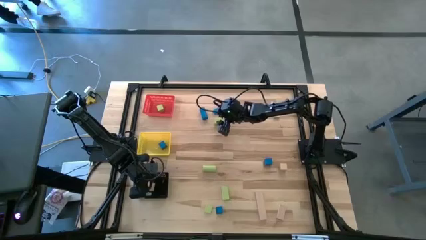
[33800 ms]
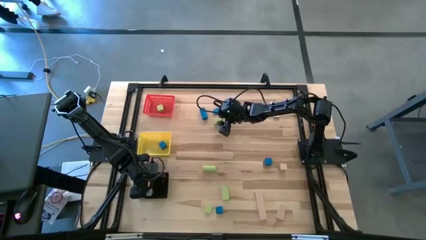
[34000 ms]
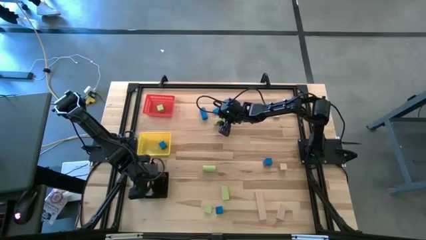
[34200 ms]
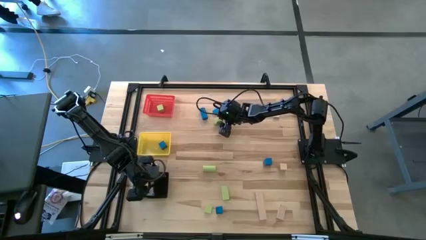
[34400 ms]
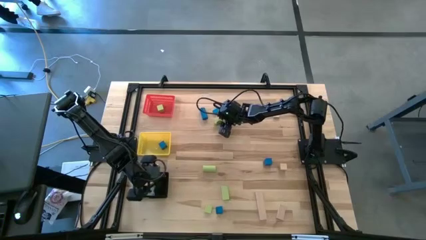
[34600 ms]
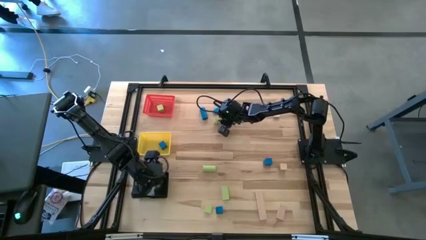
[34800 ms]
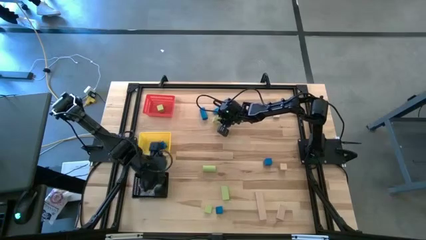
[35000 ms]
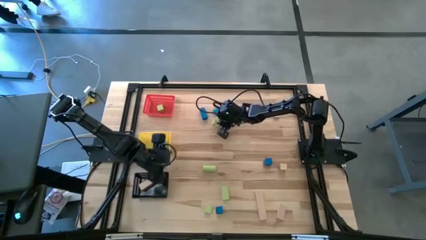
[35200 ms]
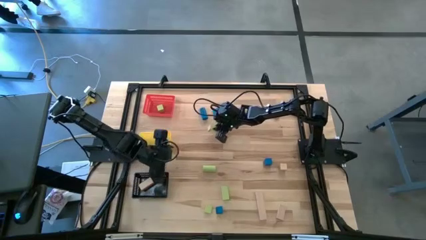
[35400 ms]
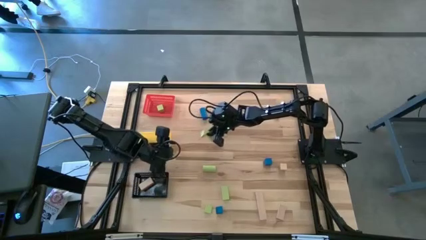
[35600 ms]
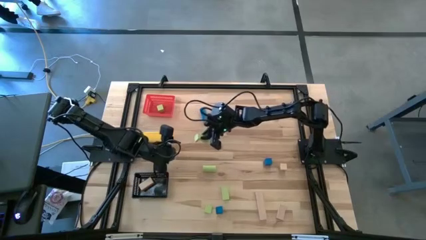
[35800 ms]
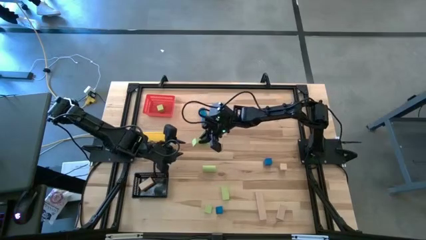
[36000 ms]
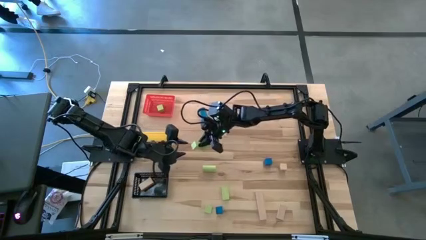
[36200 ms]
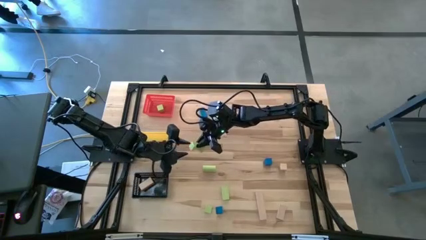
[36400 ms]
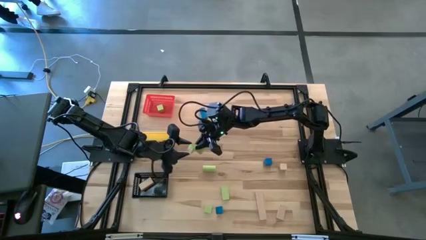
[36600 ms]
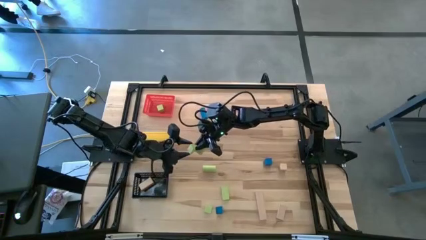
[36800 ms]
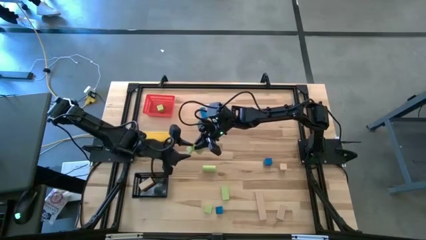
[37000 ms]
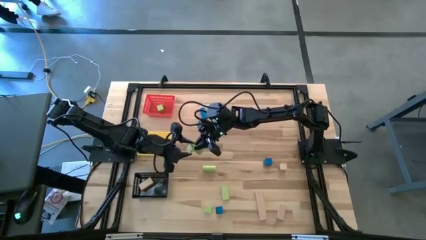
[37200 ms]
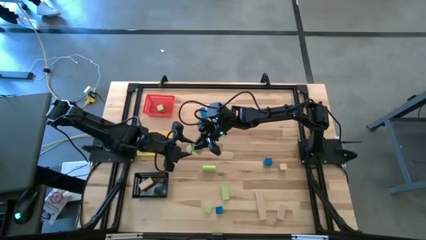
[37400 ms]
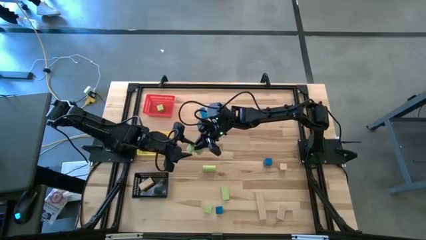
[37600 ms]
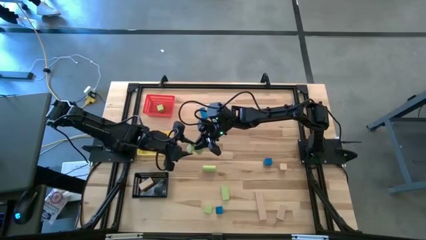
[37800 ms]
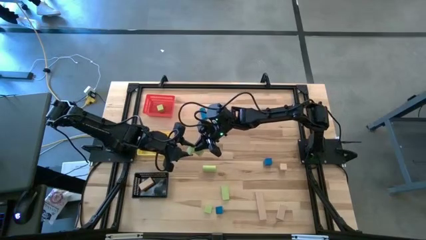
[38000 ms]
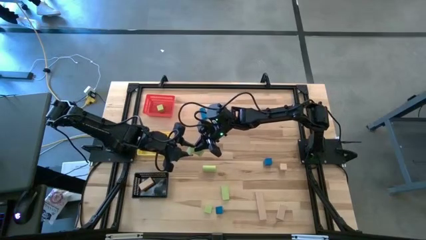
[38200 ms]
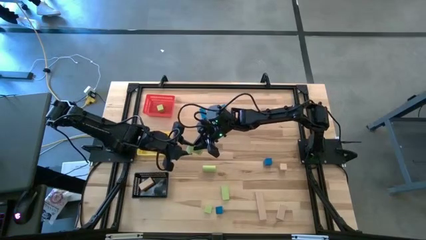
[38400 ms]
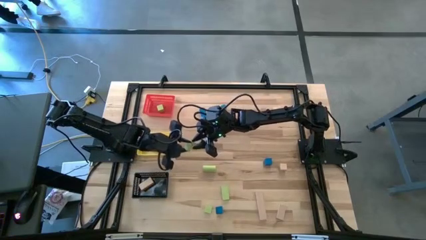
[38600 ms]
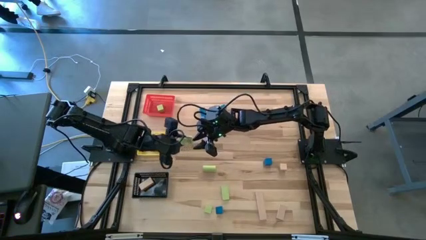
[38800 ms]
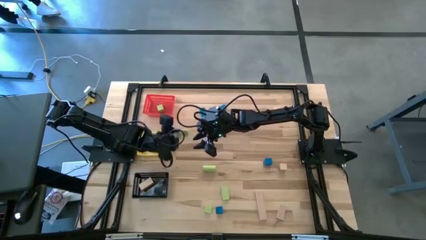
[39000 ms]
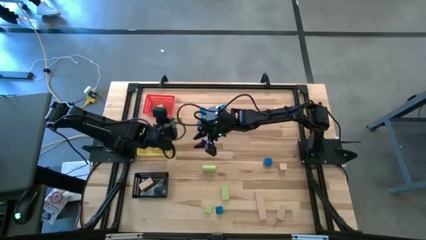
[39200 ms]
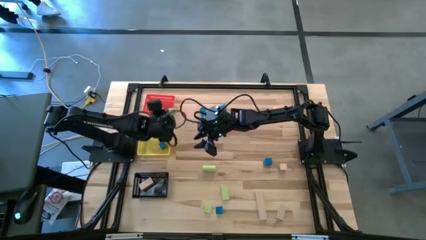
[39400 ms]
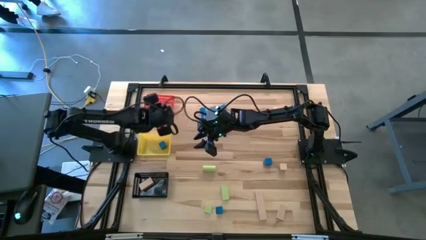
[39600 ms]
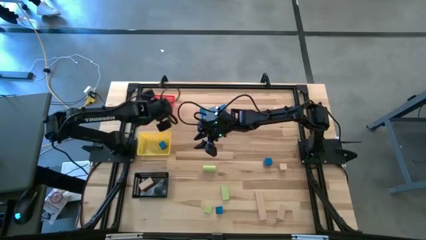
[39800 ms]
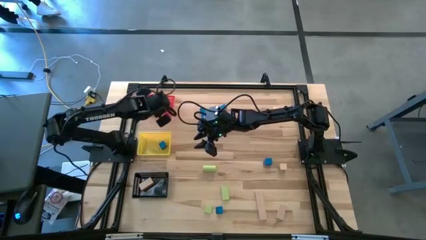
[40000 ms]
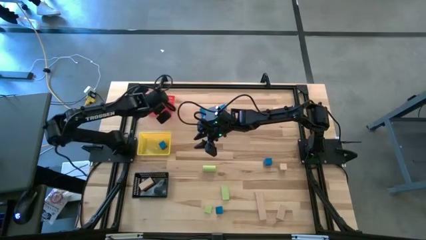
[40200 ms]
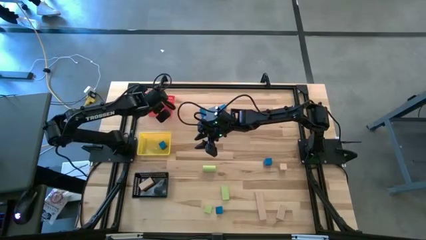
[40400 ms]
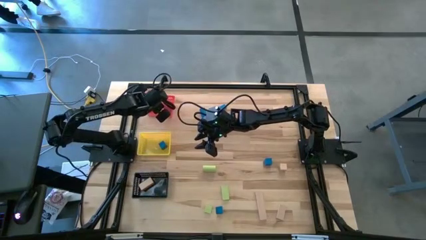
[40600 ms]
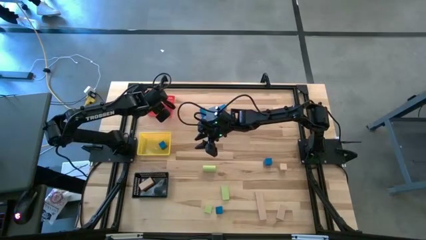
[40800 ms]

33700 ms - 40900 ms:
Task: Sort & place blocks by color
Put the green block into the red basket

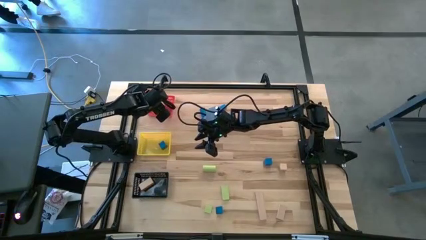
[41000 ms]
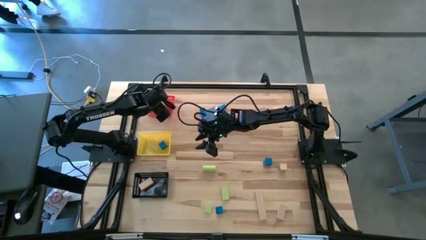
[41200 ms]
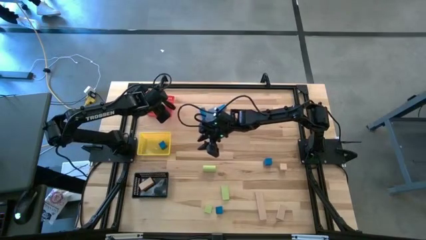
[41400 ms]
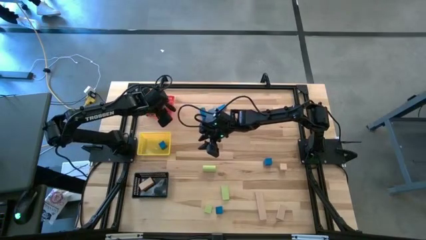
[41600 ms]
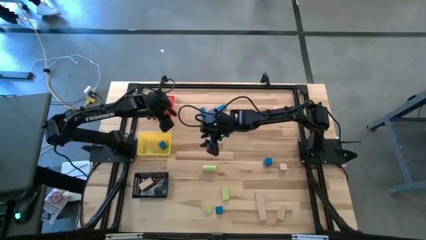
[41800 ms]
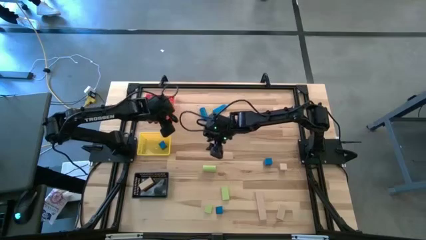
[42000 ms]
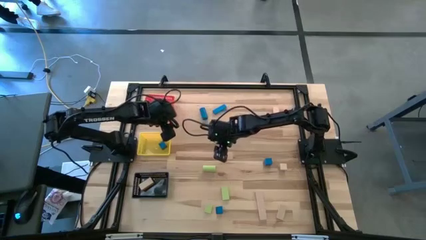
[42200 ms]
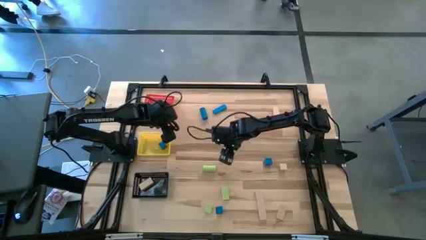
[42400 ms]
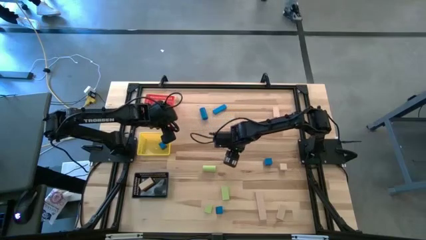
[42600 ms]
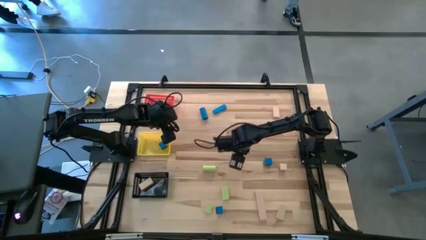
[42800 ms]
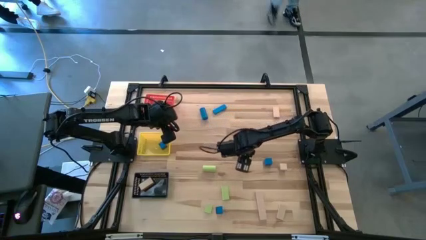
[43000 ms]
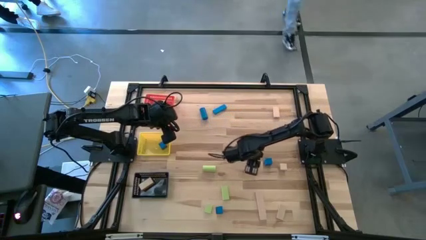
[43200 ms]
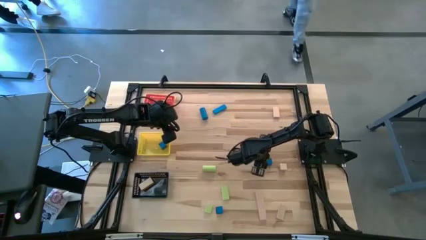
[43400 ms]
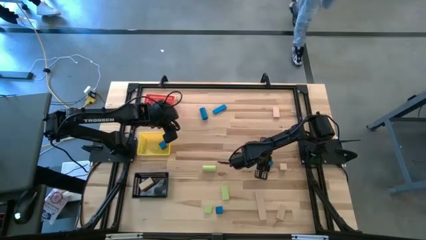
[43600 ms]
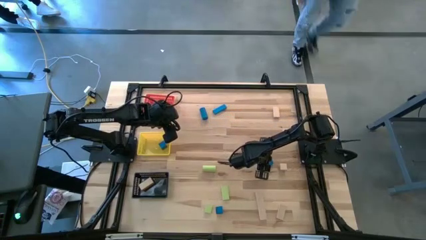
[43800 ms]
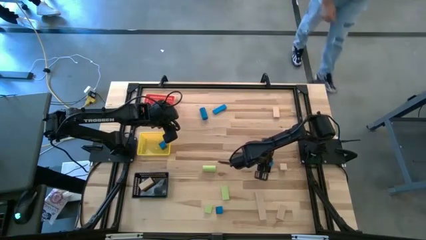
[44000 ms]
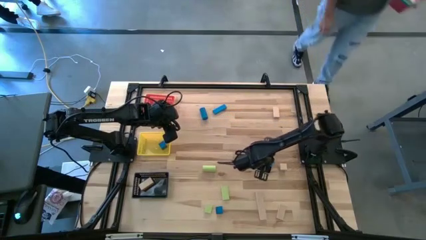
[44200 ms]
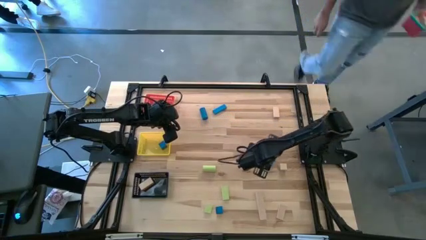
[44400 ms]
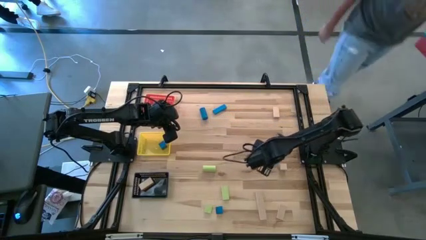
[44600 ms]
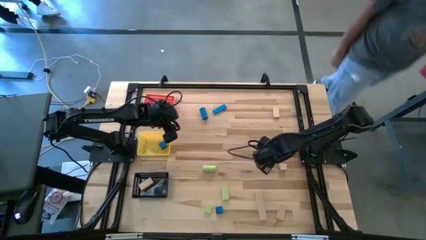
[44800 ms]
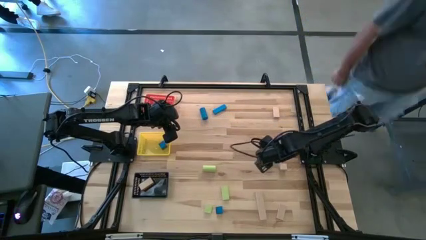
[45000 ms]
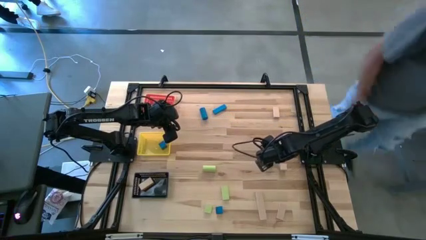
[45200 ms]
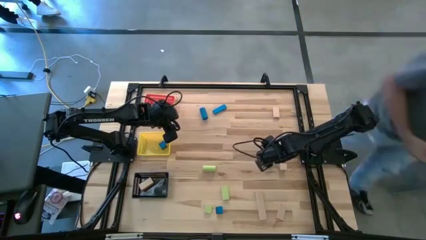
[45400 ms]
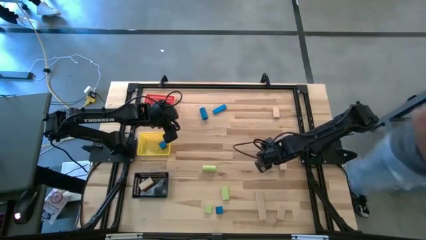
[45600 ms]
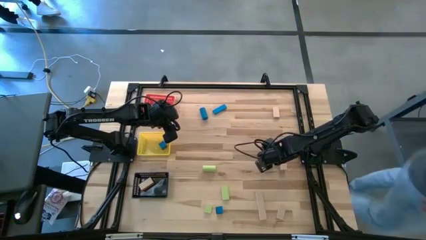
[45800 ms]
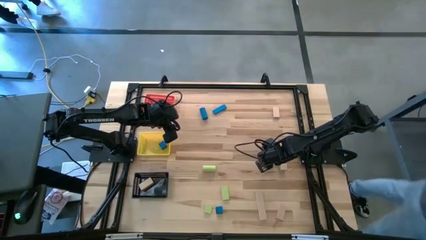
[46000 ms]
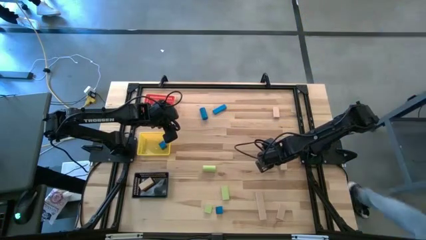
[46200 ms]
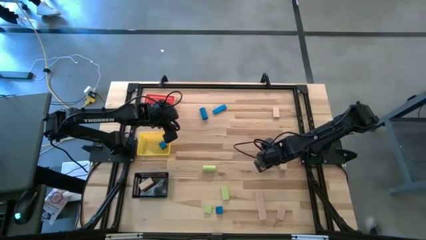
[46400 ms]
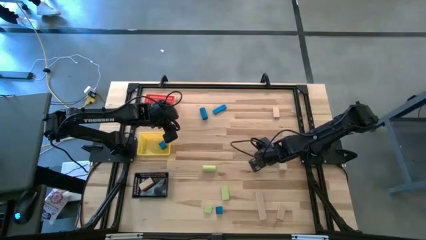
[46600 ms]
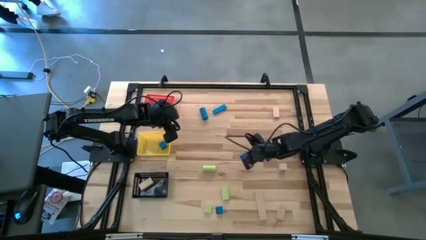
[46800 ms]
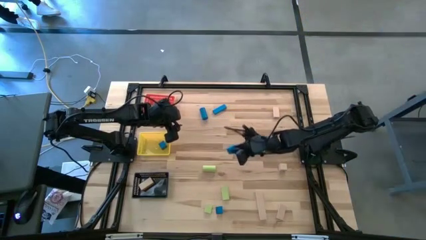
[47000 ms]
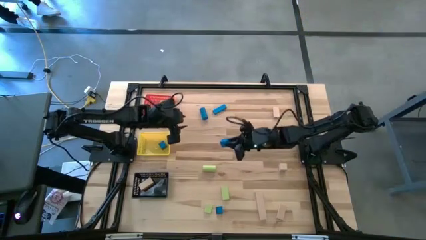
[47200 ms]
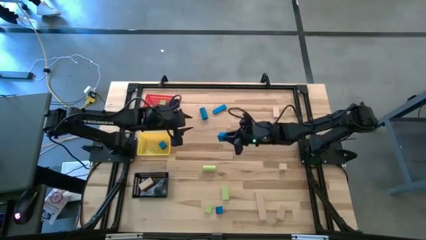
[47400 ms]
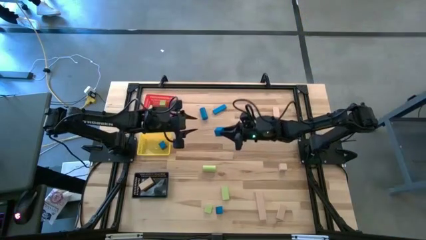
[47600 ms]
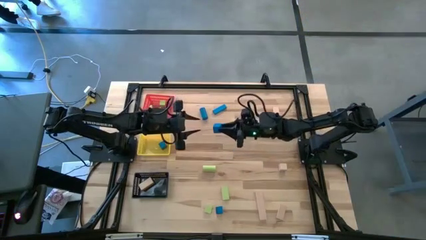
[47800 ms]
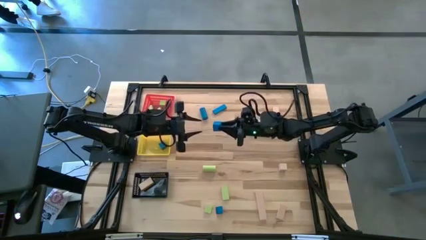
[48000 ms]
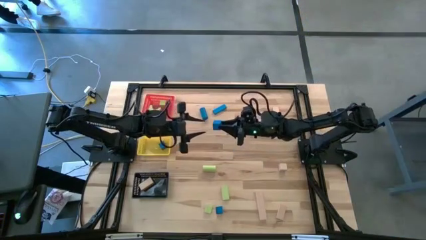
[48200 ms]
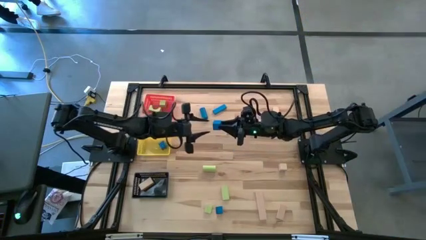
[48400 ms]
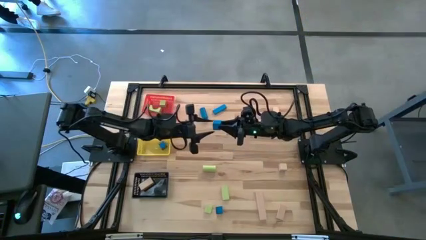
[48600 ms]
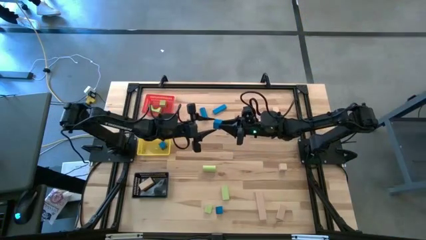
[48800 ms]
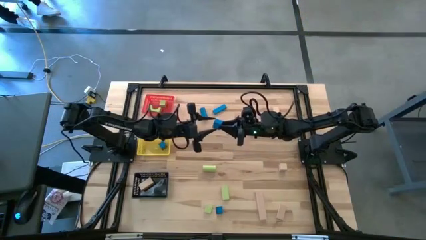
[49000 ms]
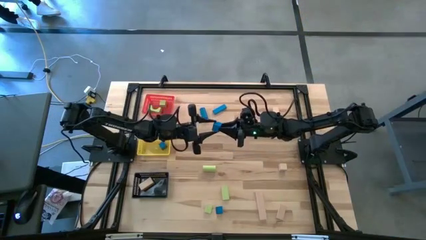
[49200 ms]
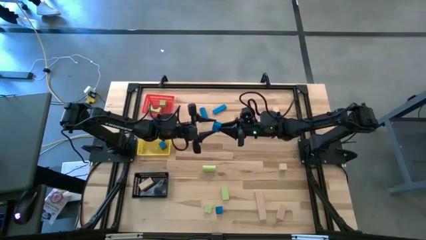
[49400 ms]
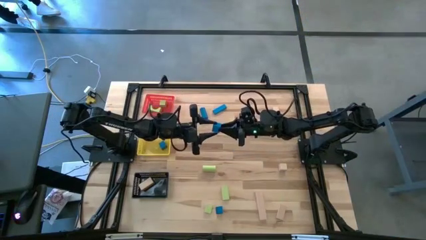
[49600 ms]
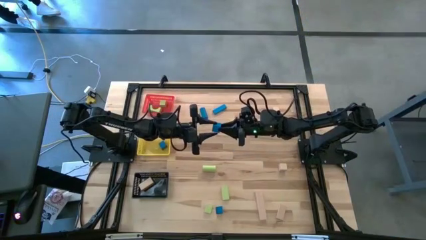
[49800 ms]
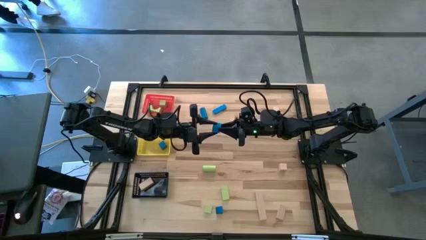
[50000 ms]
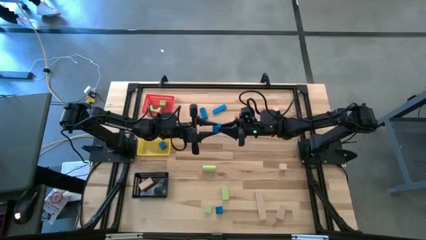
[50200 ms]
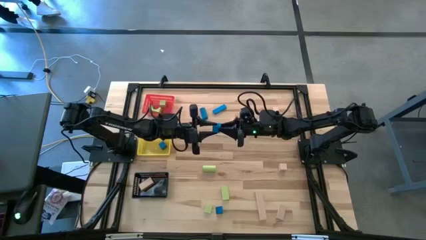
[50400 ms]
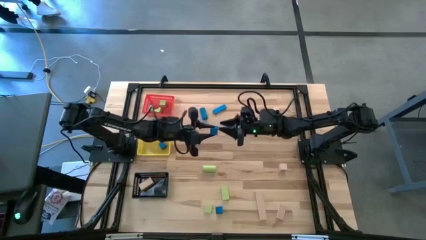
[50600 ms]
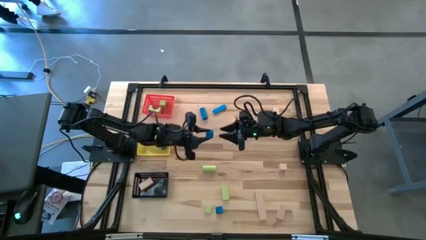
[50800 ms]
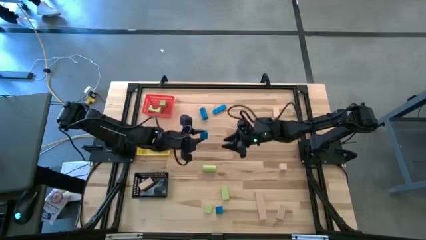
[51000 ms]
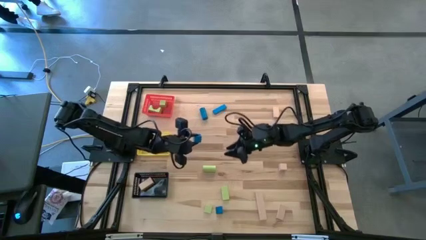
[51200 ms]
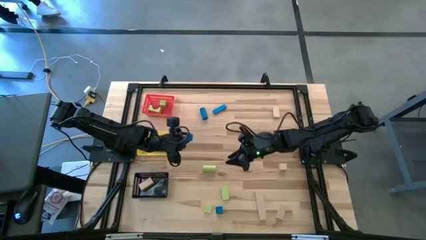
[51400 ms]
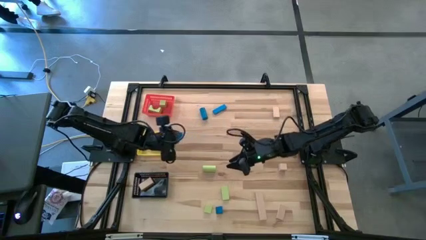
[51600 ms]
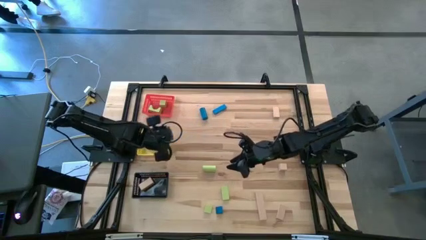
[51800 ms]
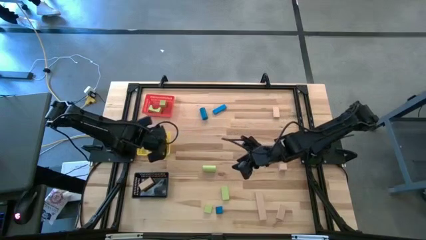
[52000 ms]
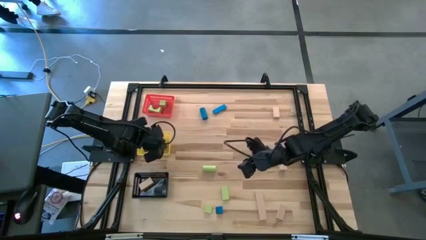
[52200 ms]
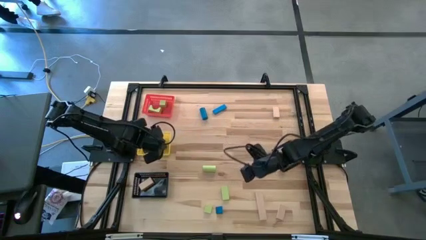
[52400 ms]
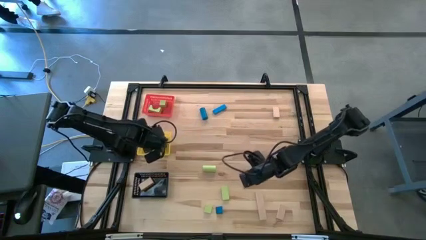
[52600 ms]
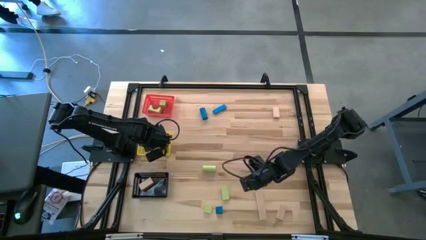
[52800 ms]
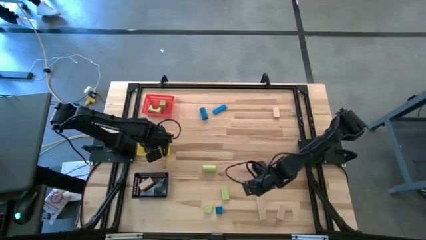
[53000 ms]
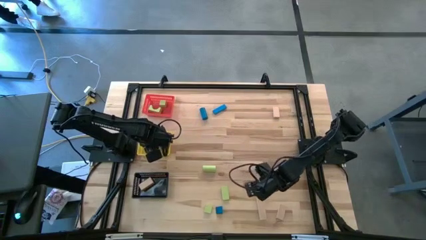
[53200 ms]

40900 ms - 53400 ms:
Put the blue square block in to the yellow basket
